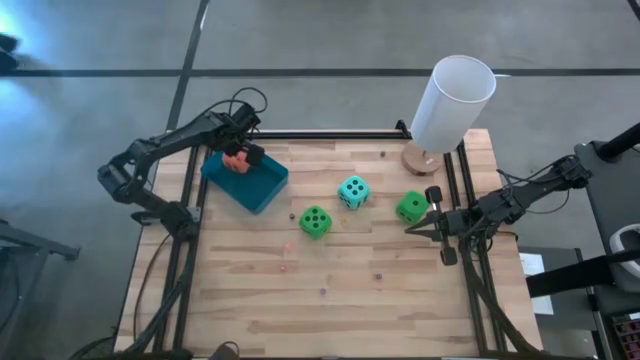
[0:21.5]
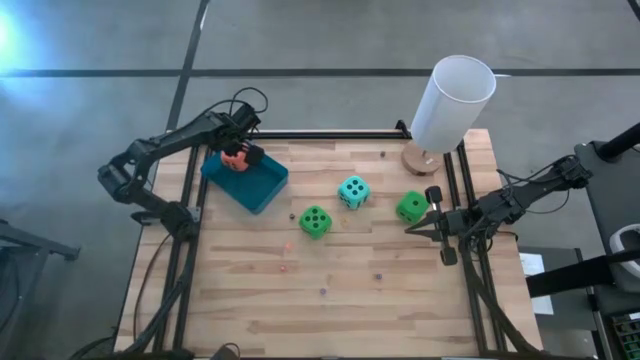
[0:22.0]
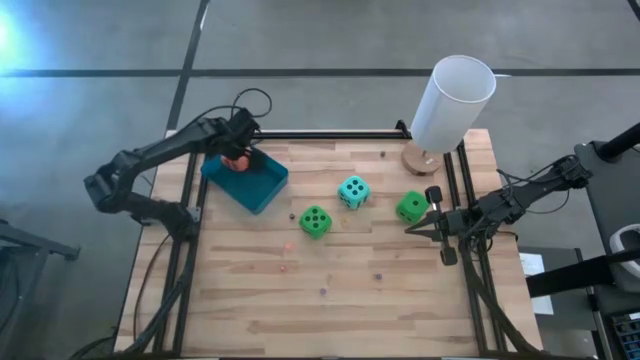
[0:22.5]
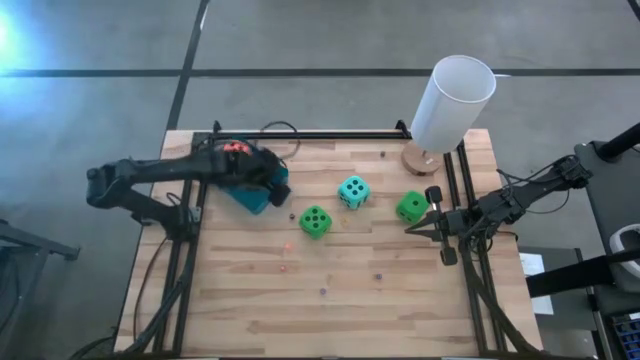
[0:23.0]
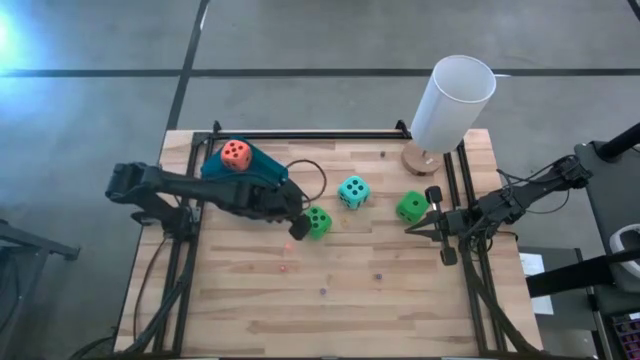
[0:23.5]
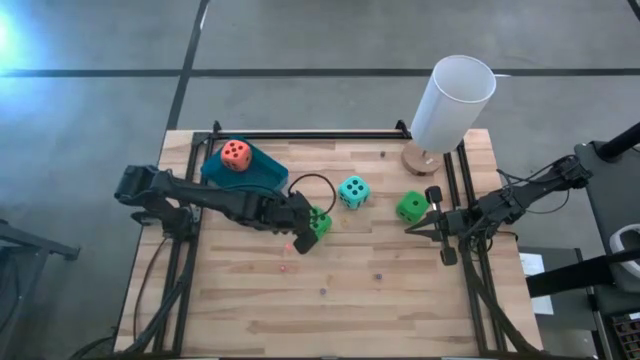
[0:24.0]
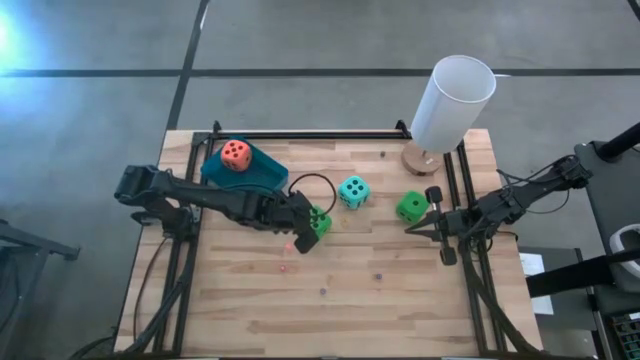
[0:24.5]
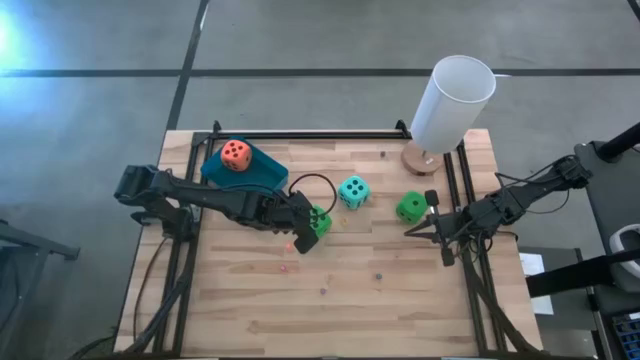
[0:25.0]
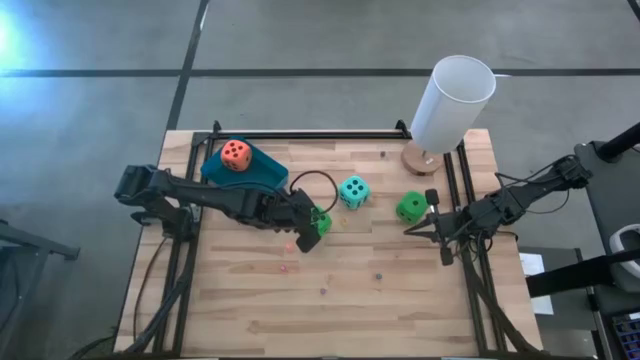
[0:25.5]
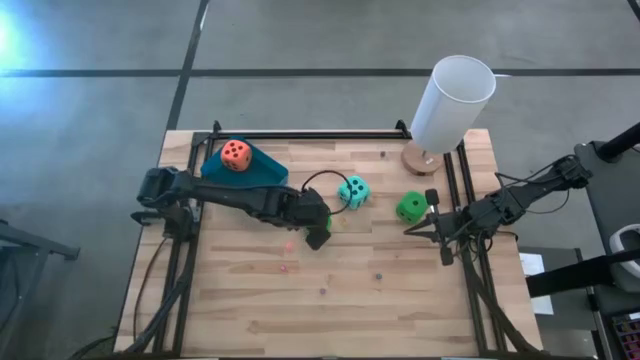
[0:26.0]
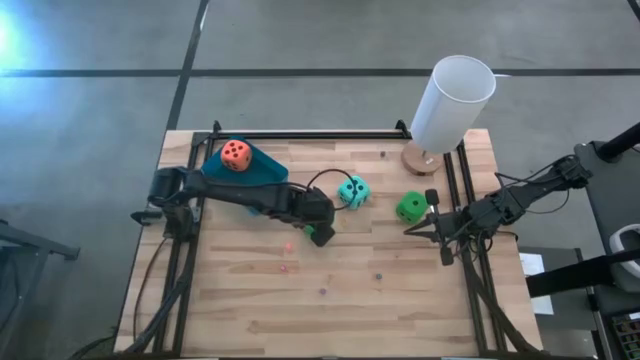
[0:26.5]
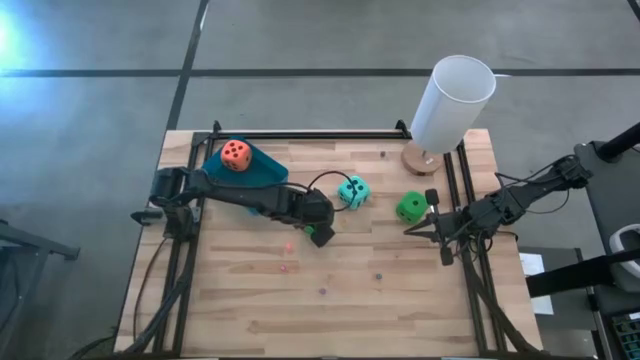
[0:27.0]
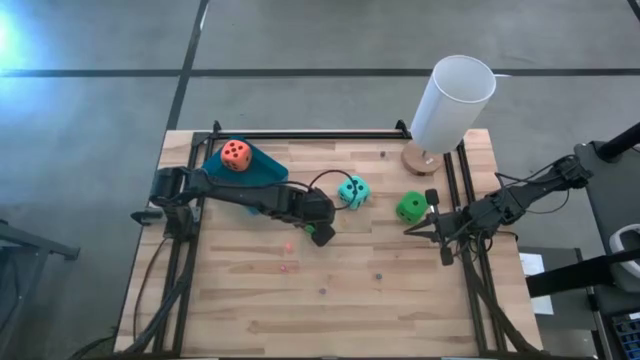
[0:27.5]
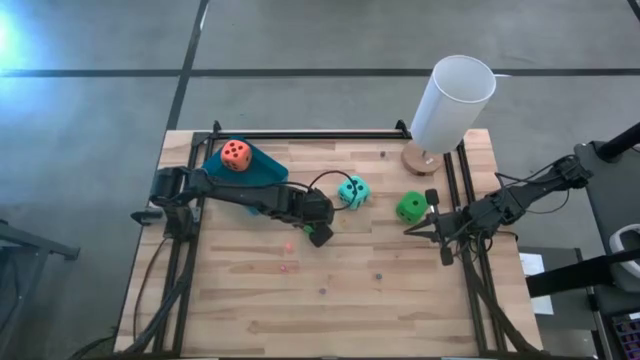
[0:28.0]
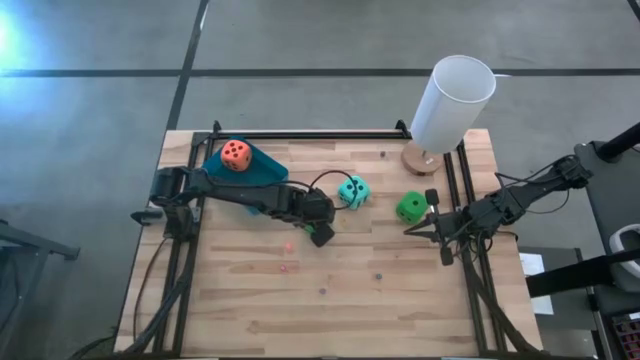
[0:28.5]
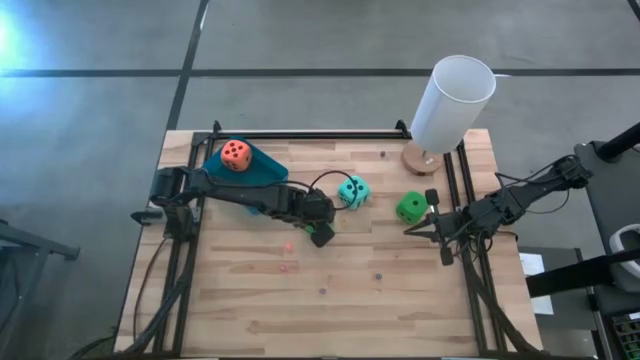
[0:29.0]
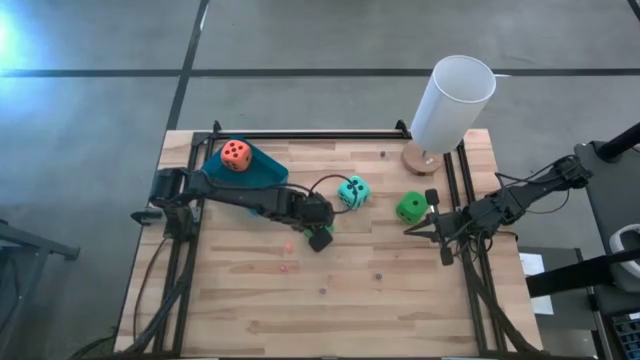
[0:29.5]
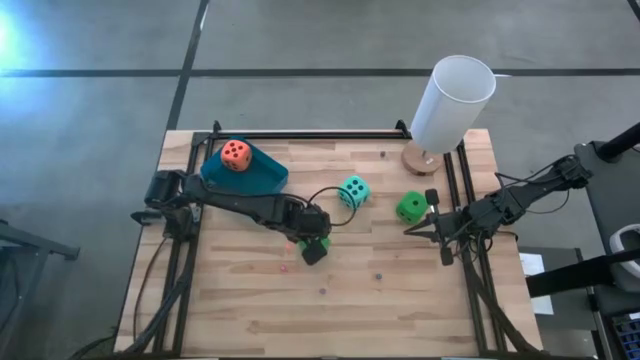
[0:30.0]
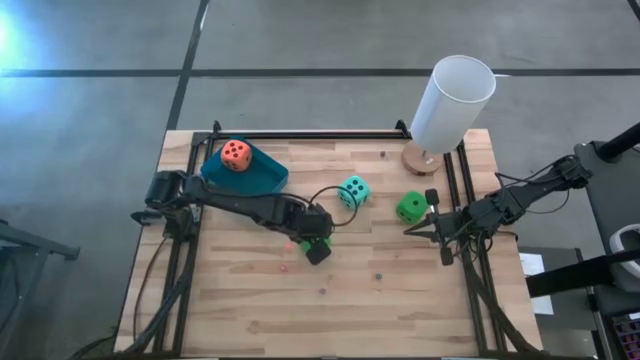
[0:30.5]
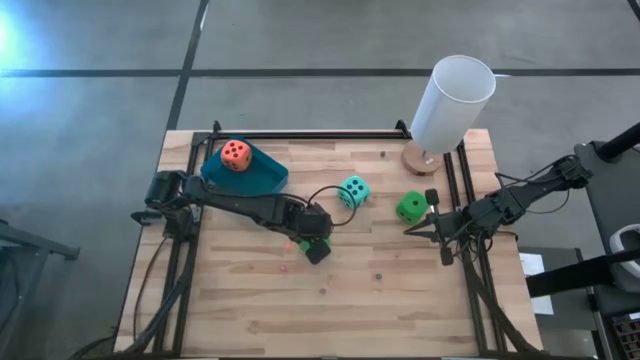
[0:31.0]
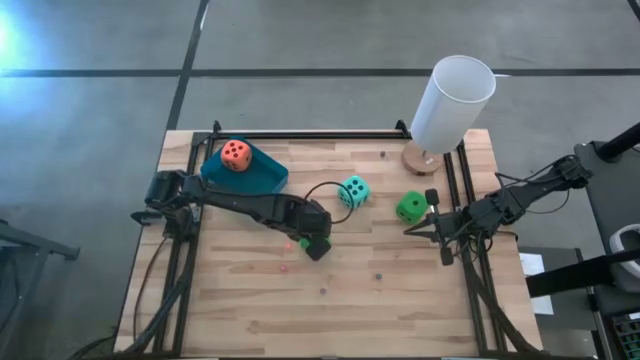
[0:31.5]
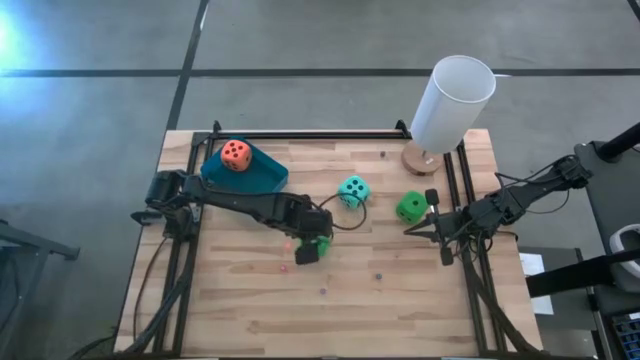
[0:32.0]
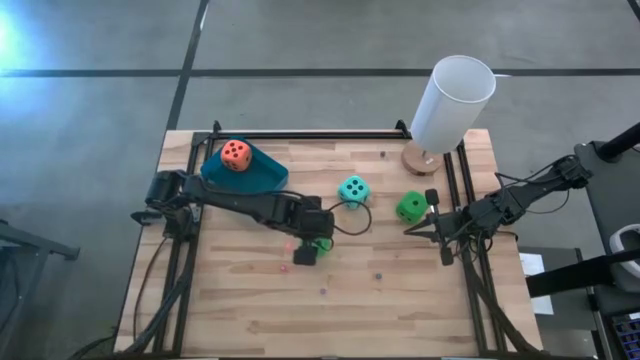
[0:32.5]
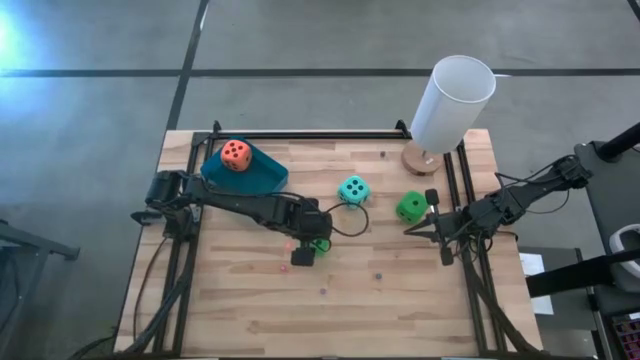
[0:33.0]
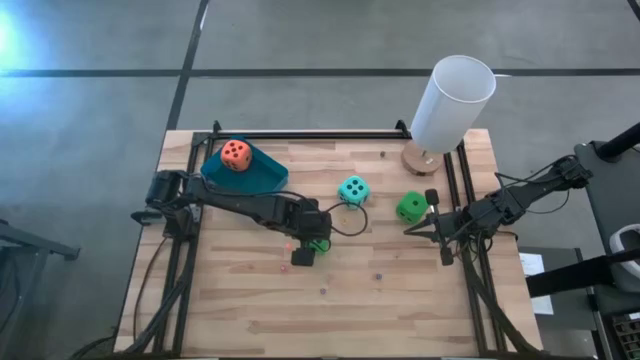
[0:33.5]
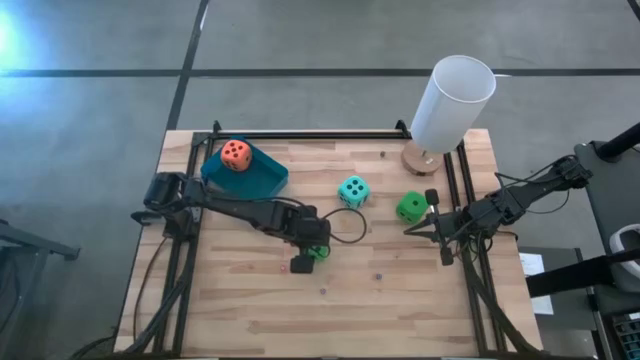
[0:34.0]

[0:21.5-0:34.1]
Task: Pick & Place Dice
Put the big green dice on the left into the blue bin

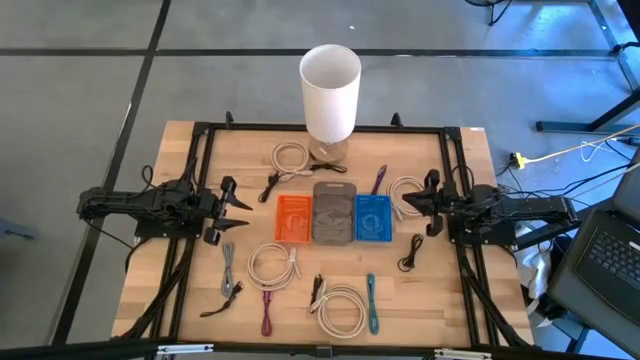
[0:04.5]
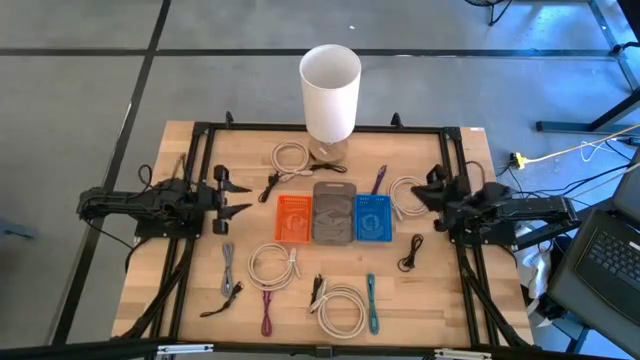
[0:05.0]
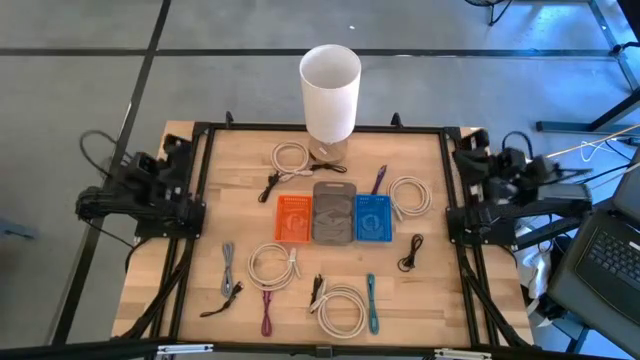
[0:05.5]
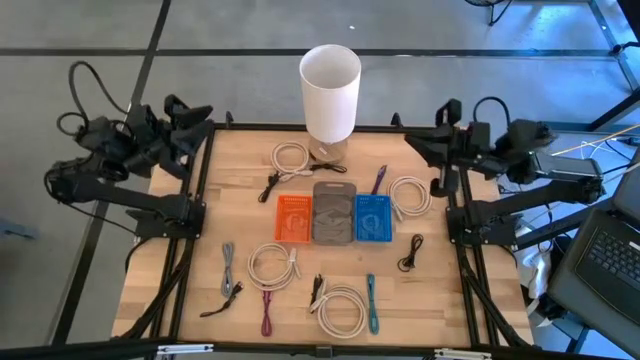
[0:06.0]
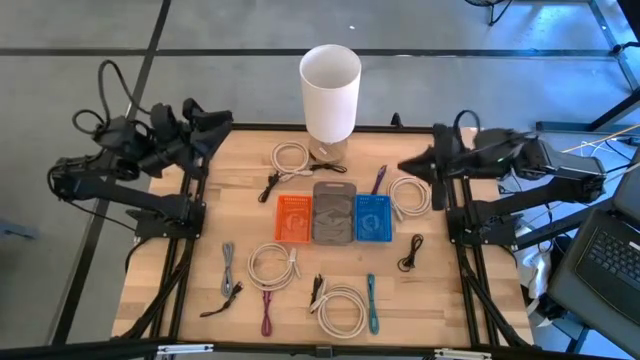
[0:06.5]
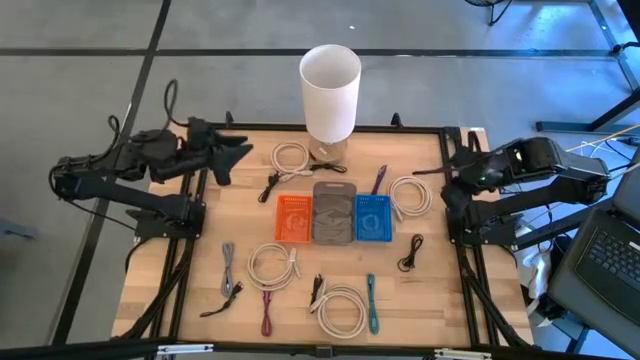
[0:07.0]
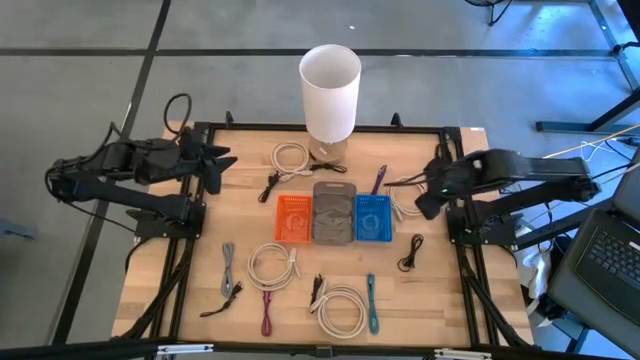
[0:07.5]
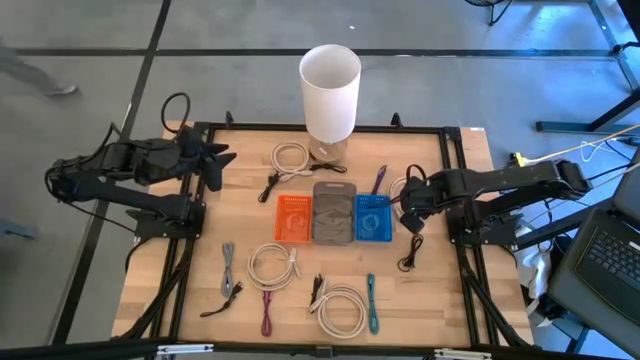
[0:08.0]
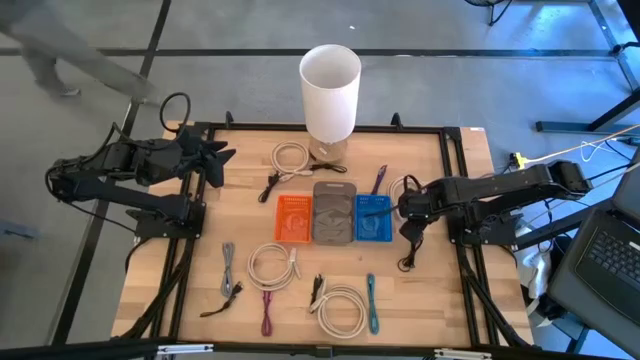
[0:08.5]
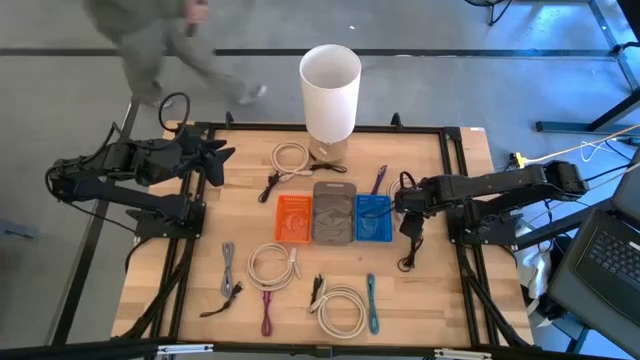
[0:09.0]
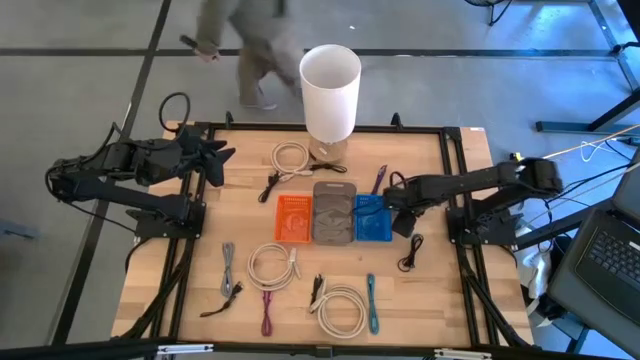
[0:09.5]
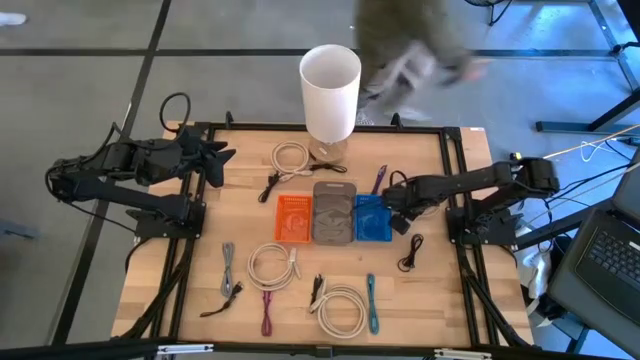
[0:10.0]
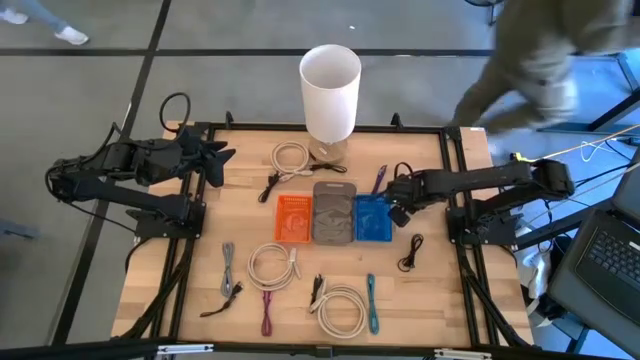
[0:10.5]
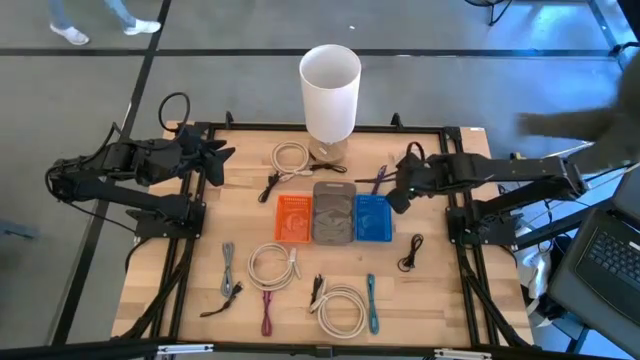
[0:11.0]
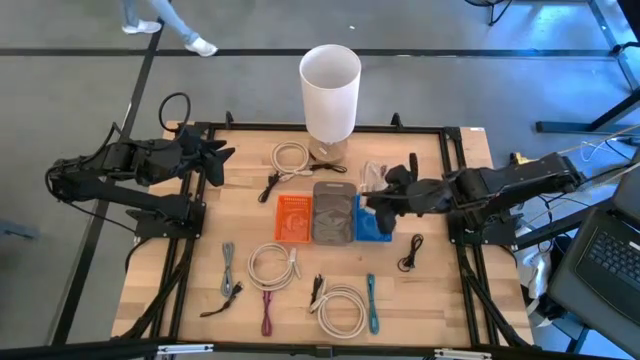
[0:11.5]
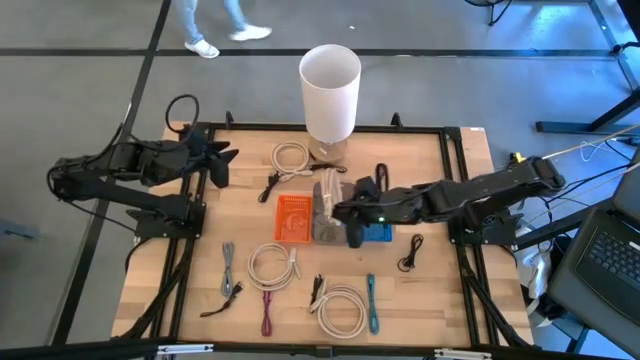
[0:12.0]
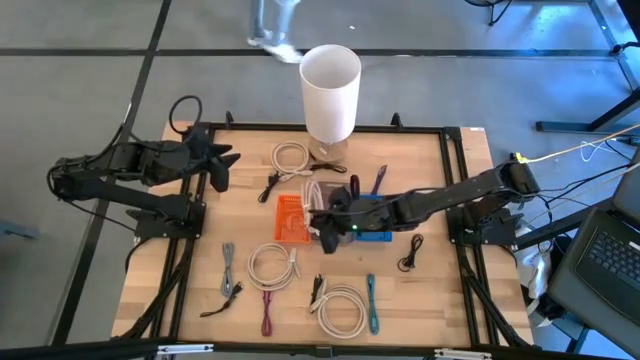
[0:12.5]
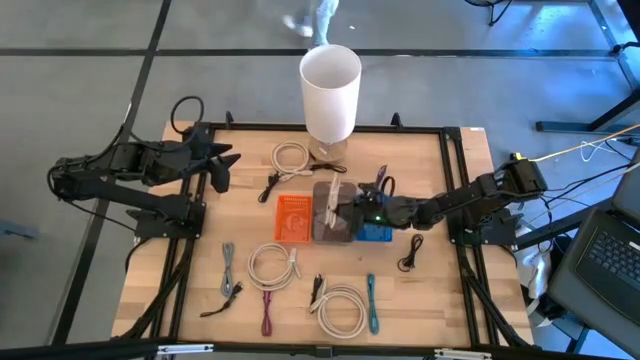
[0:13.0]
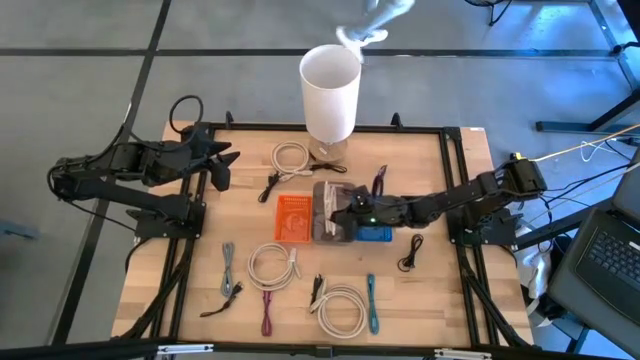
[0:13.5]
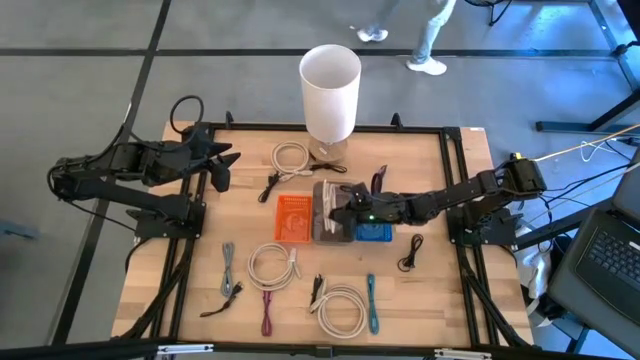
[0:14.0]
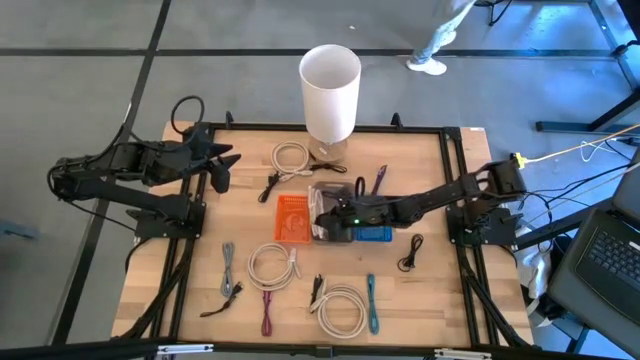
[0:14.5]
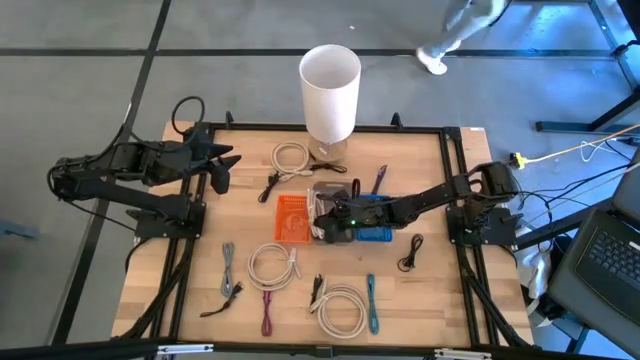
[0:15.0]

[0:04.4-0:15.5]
Task: Pick & Place USB Port
Put the brown HDMI cable into the black bin
